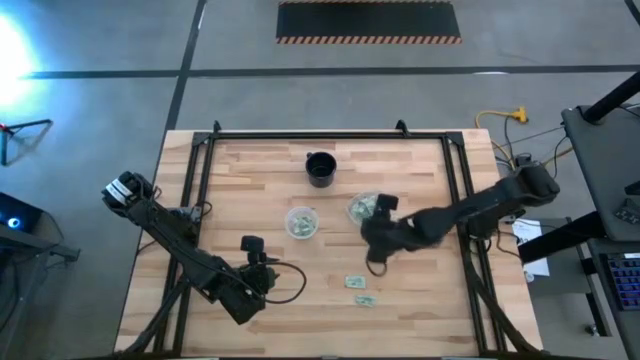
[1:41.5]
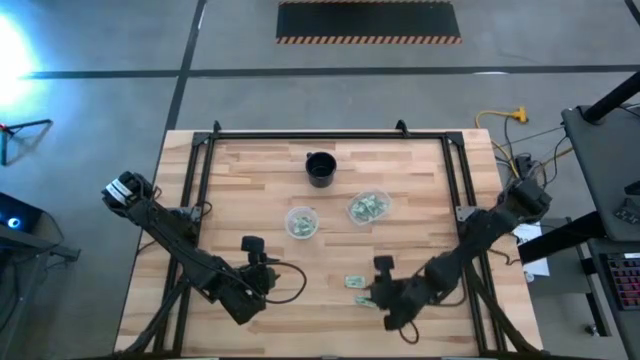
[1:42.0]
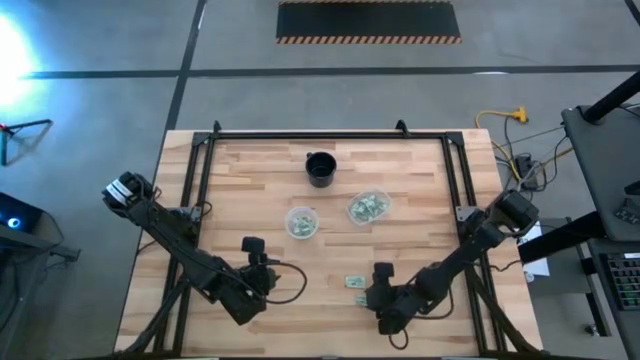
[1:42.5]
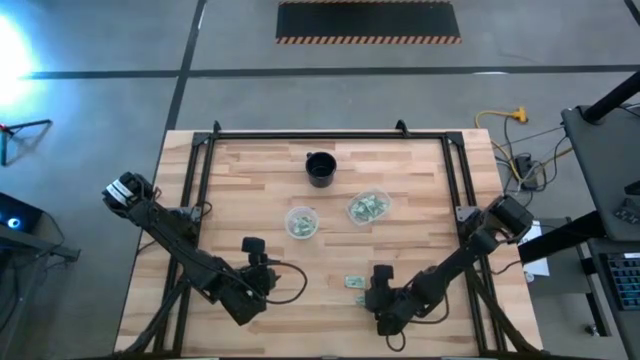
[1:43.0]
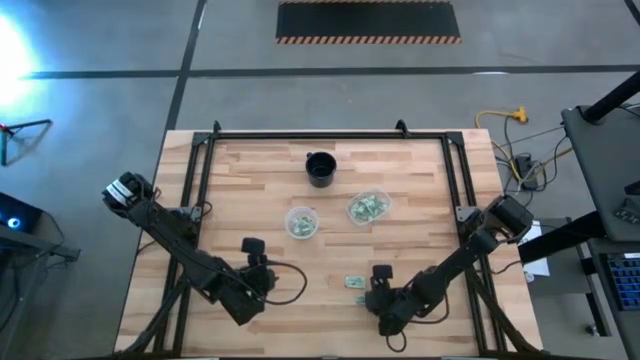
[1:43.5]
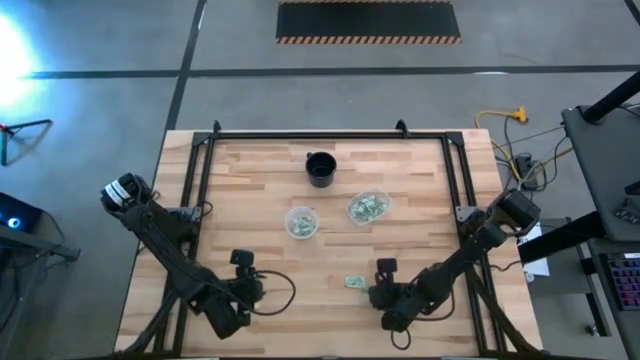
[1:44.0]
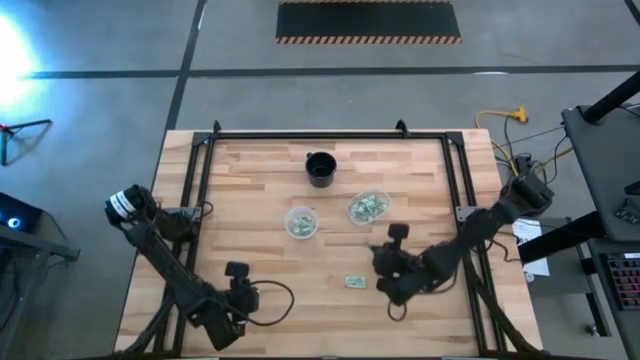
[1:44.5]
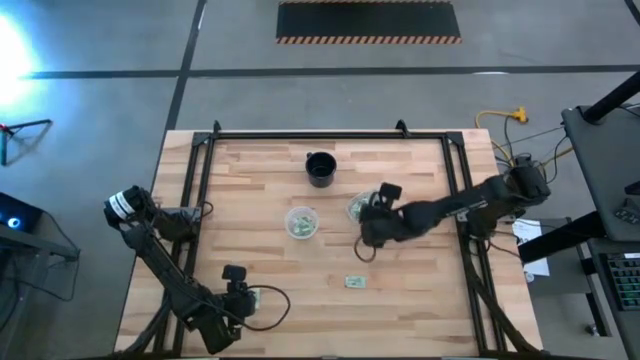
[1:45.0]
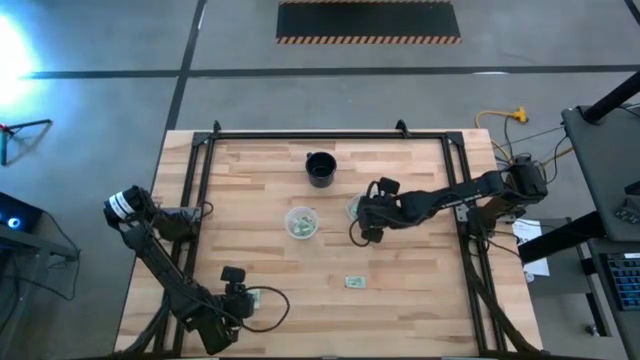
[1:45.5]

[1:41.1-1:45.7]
Task: Pick and place Stevia / Truvia into bins
Put the green stevia packet into the right transparent container

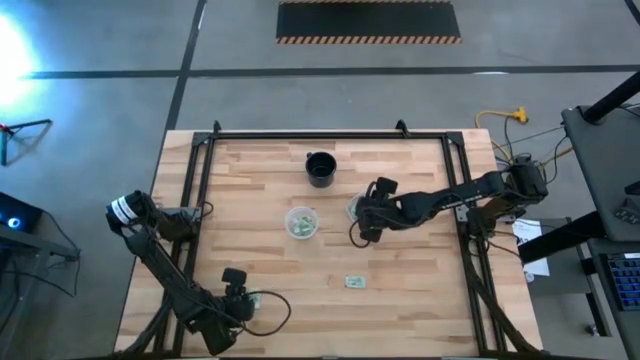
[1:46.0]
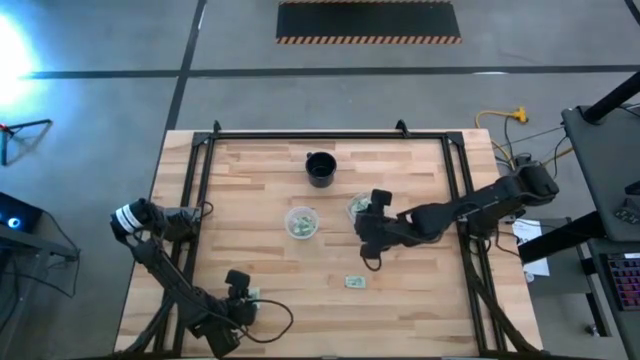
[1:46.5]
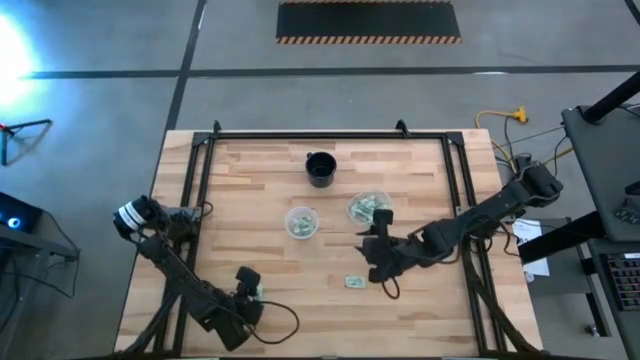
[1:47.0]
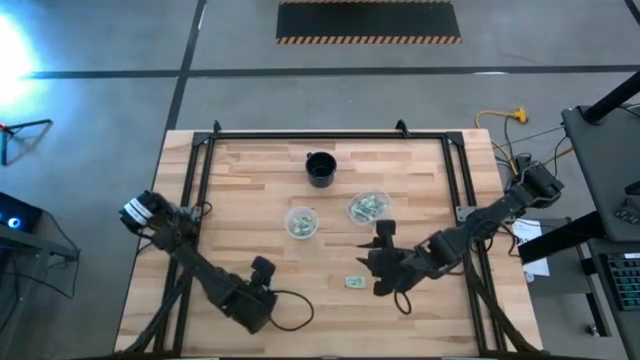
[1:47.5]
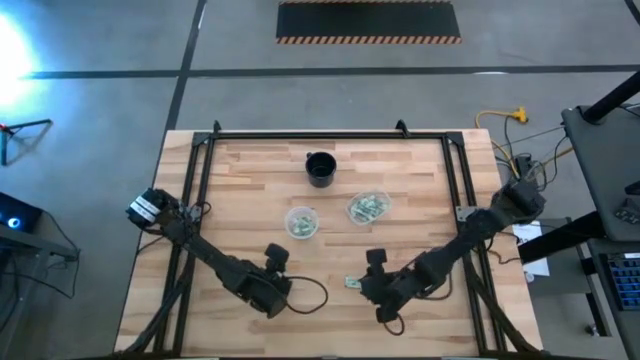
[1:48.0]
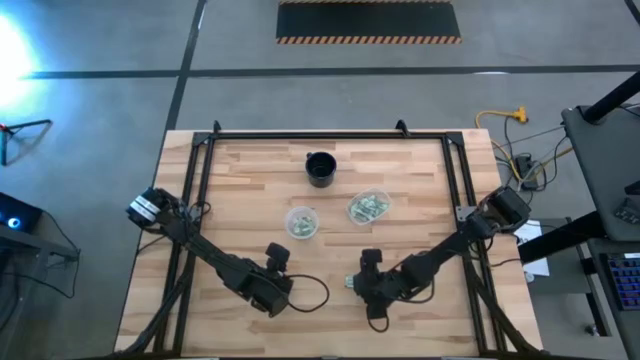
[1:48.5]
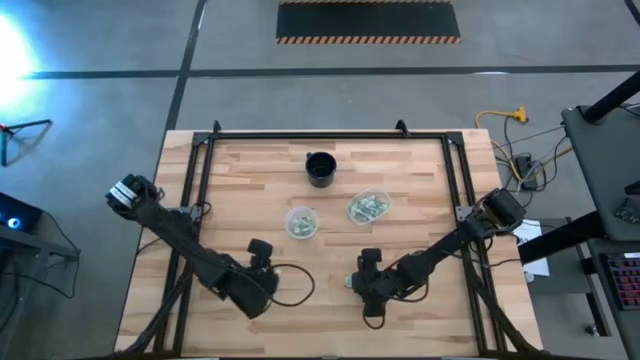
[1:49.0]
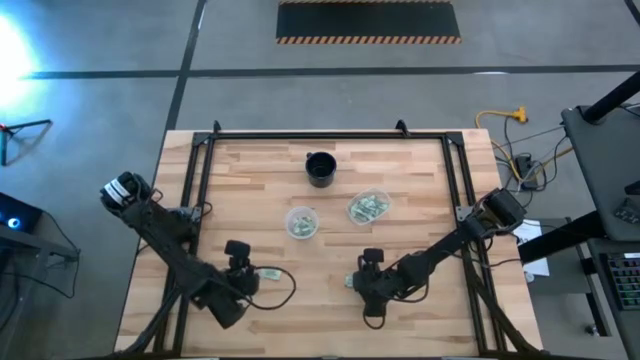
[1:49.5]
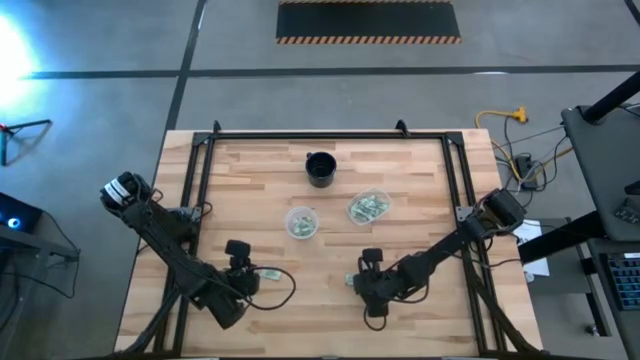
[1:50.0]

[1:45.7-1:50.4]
Put the green stevia packet into the right transparent container

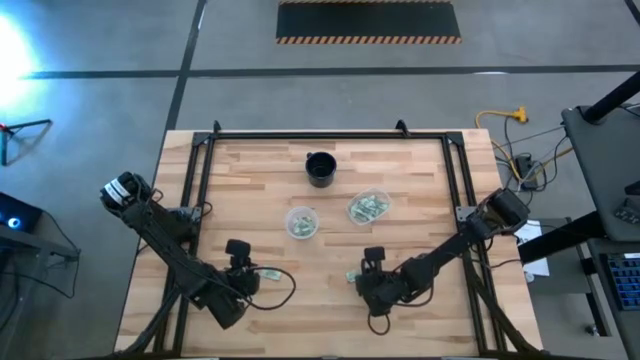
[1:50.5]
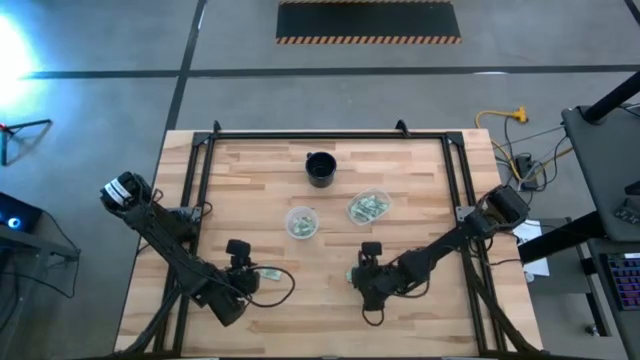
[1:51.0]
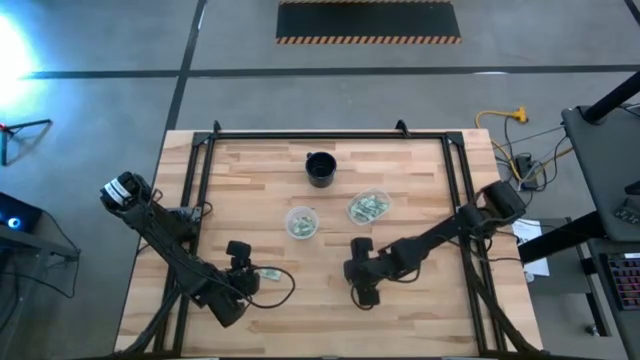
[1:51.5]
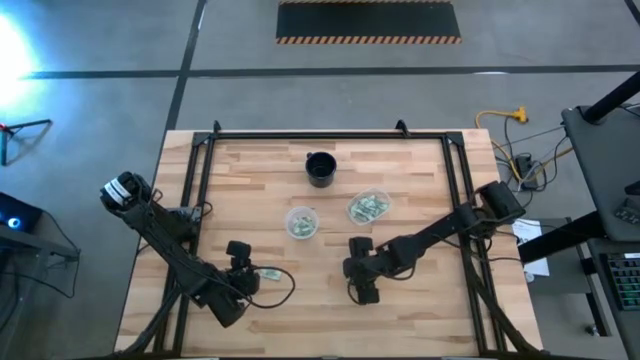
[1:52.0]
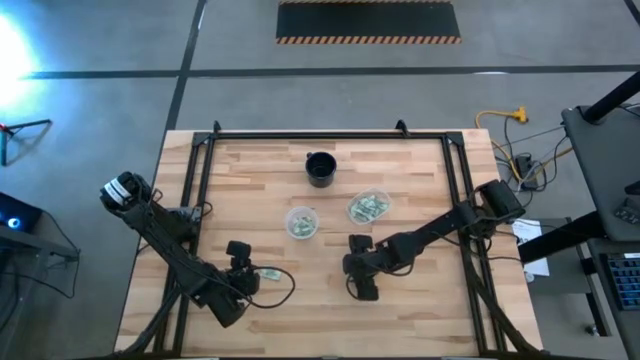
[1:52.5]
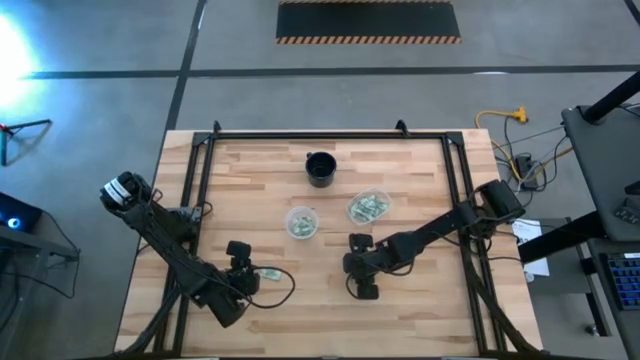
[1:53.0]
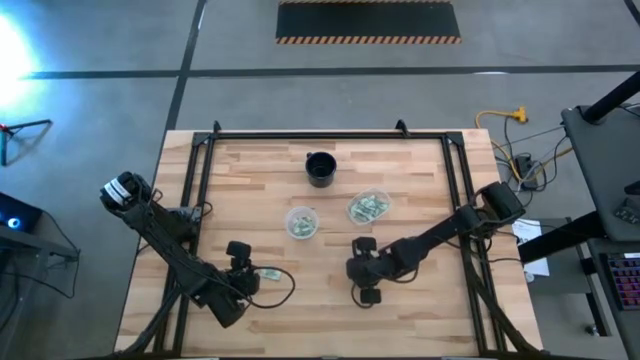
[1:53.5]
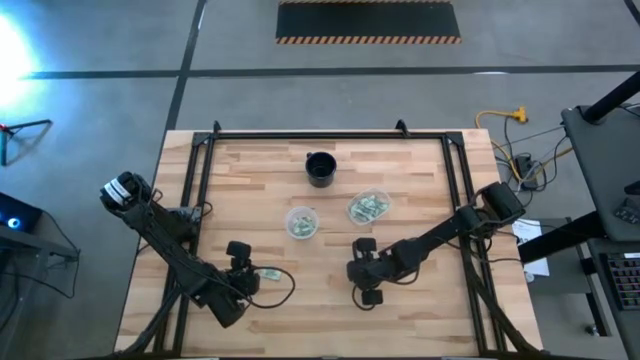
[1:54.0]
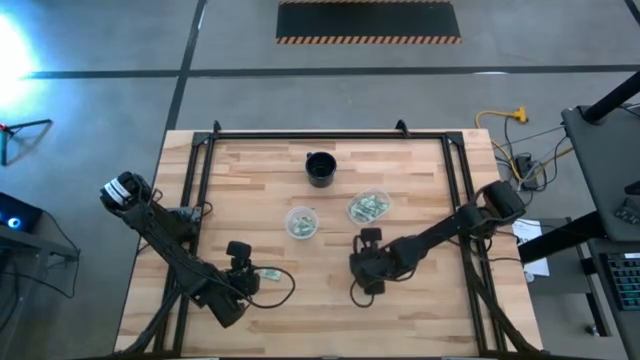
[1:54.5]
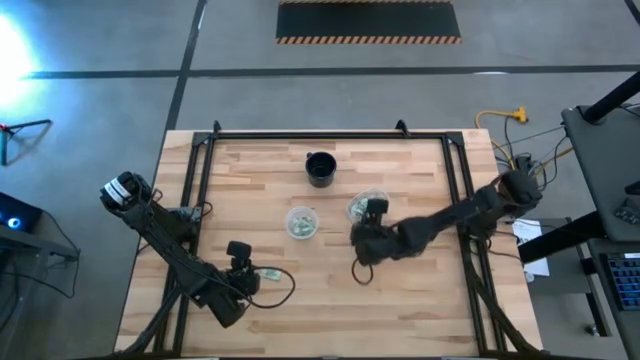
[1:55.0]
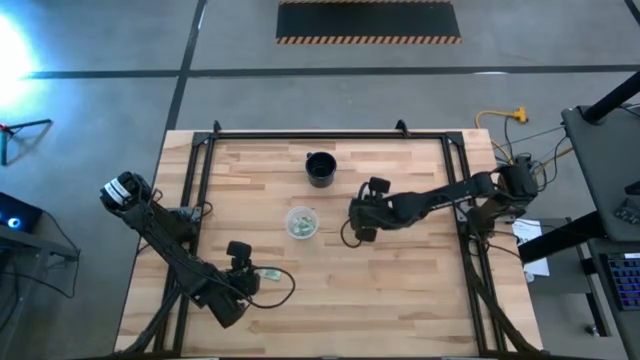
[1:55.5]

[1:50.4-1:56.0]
Put the green stevia packet into the right transparent container

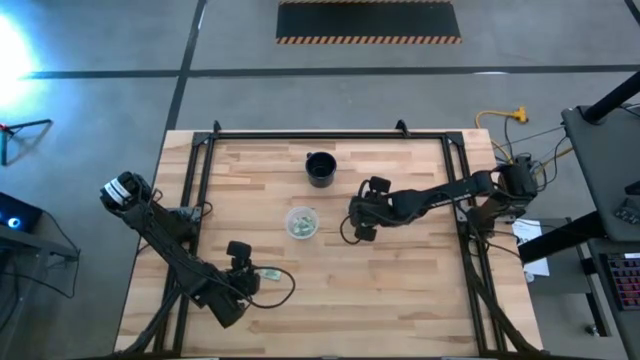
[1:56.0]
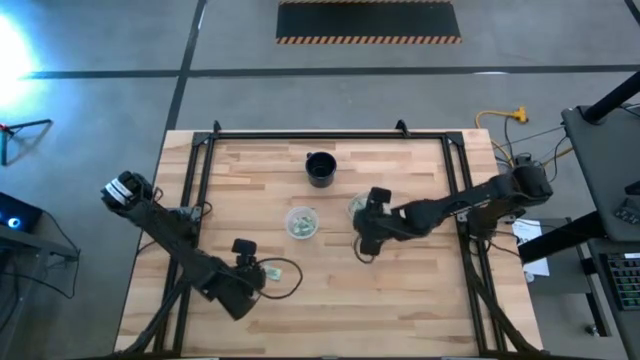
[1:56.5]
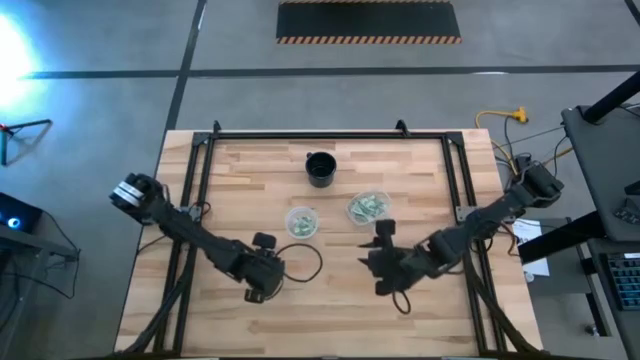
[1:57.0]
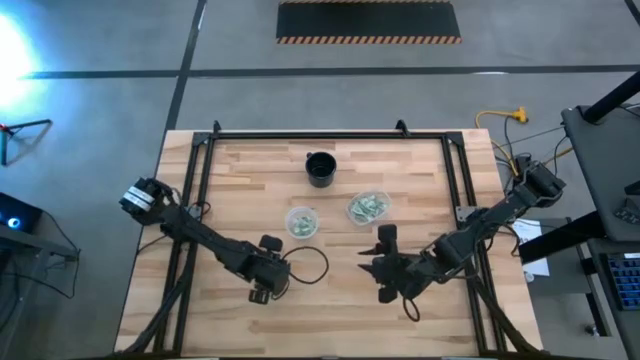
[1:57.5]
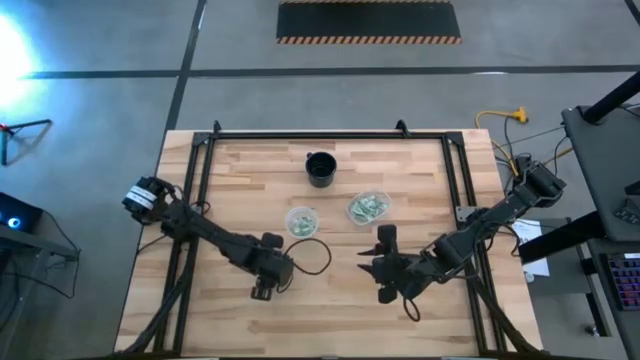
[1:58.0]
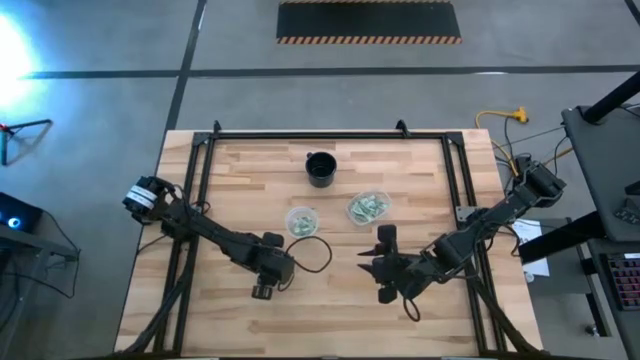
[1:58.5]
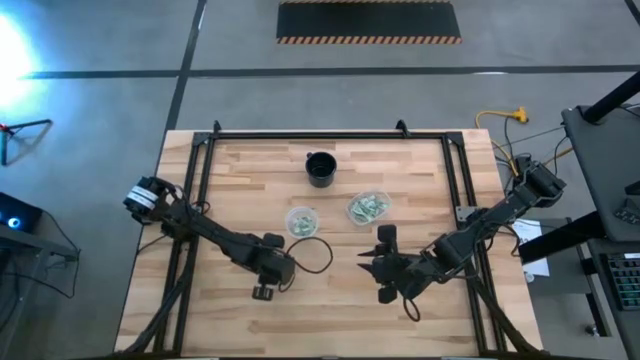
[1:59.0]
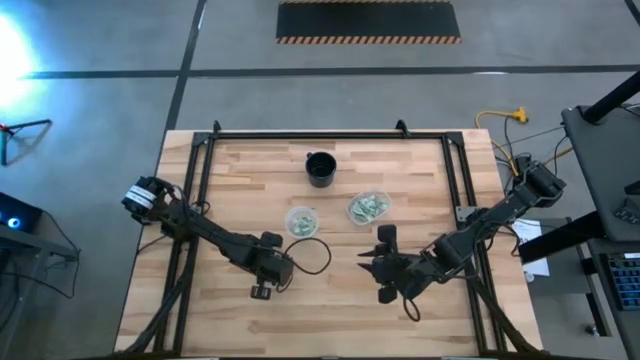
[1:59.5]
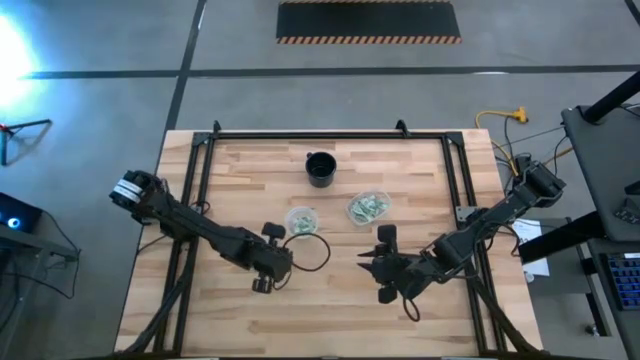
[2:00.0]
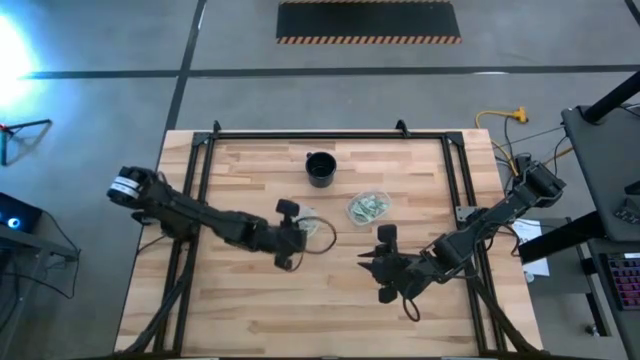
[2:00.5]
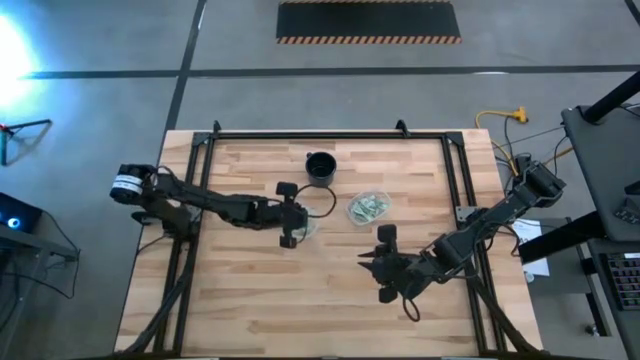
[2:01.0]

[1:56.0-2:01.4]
Put the green stevia packet into the left transparent container

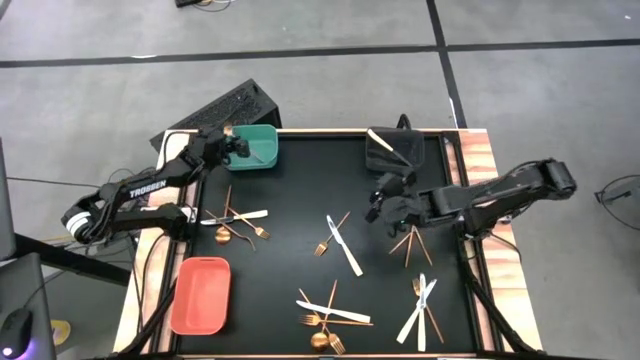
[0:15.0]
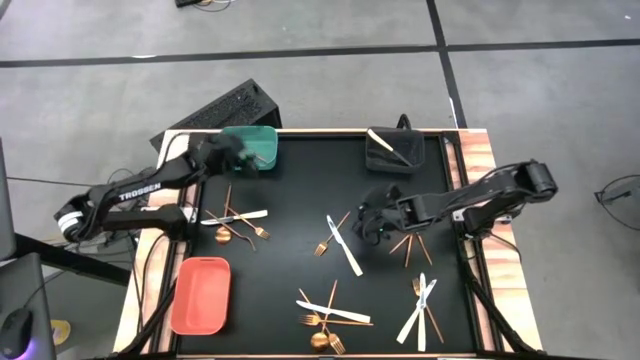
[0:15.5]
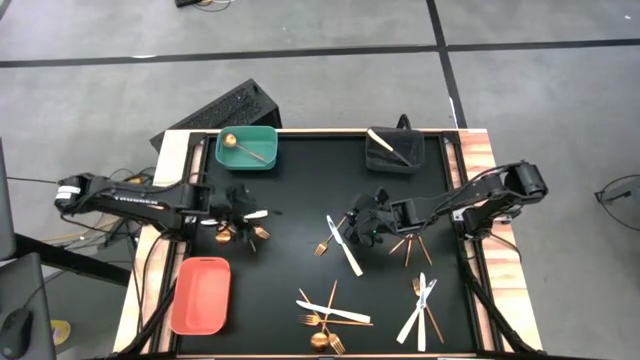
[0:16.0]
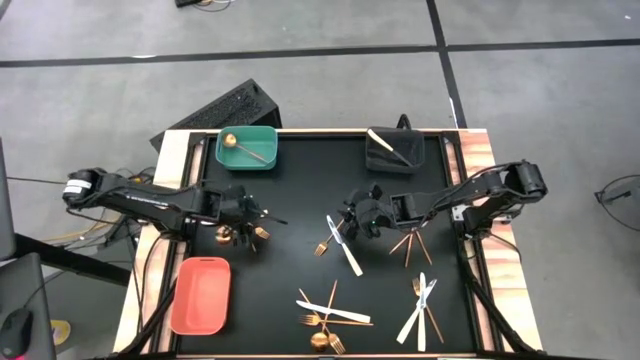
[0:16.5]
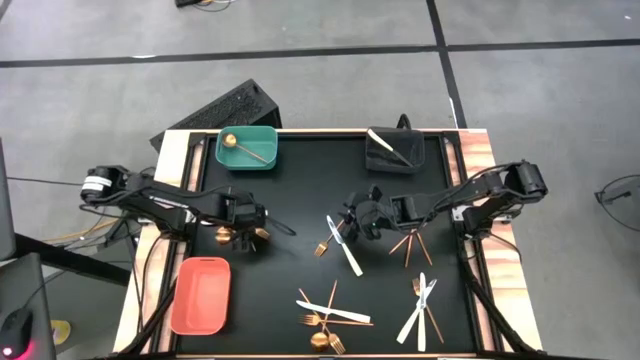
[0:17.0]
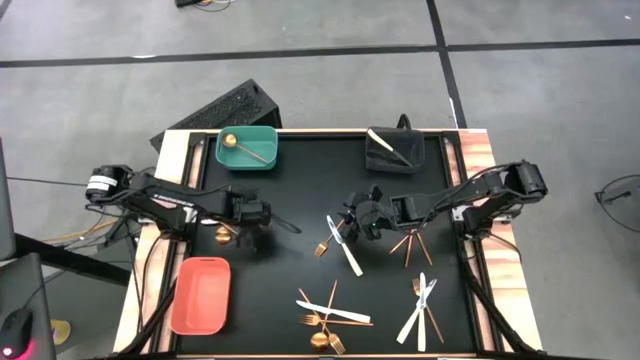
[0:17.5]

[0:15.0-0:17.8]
Task: Sort silverware by color (type)
Put the gold fork into the orange bin
